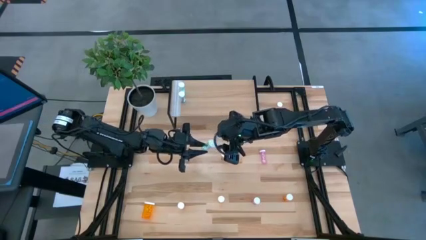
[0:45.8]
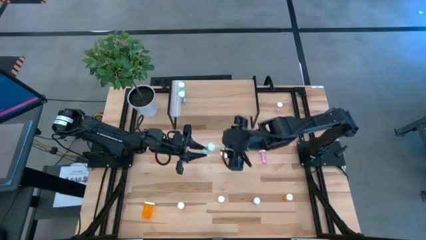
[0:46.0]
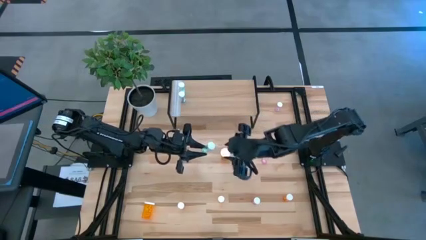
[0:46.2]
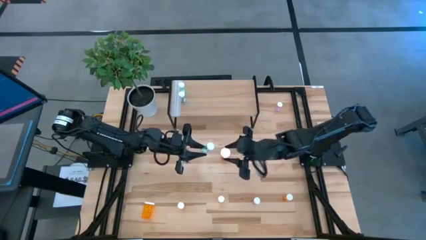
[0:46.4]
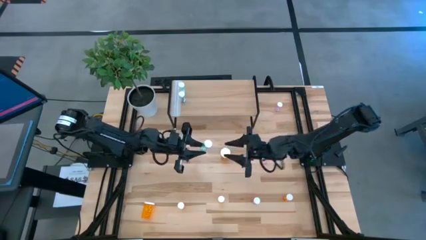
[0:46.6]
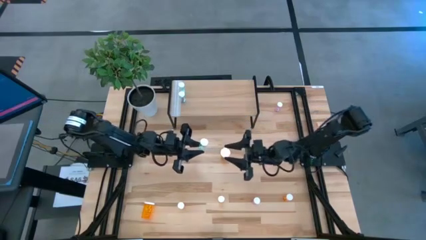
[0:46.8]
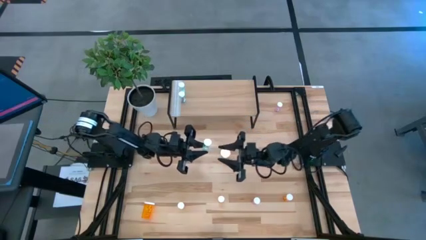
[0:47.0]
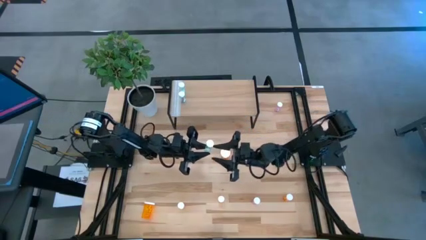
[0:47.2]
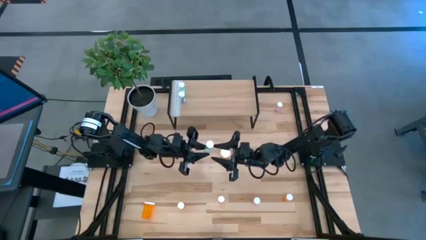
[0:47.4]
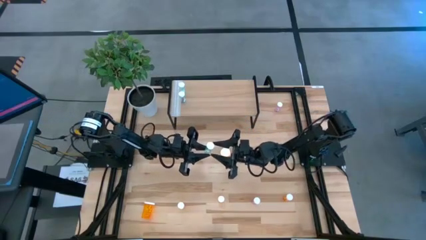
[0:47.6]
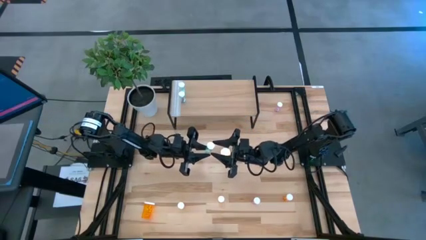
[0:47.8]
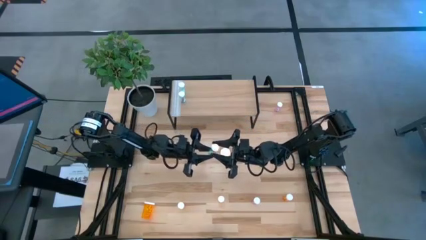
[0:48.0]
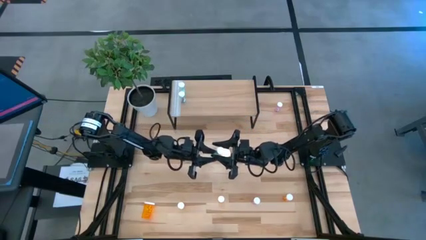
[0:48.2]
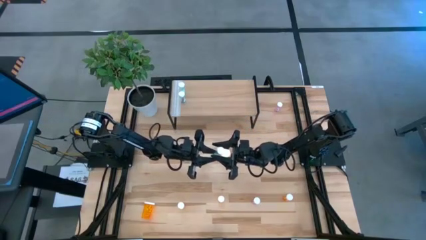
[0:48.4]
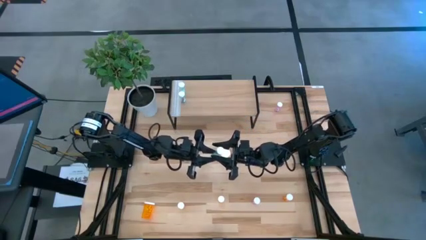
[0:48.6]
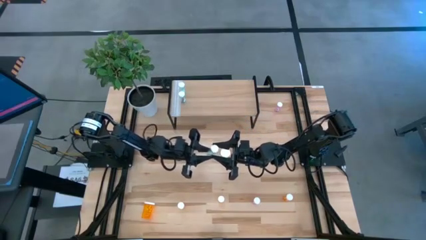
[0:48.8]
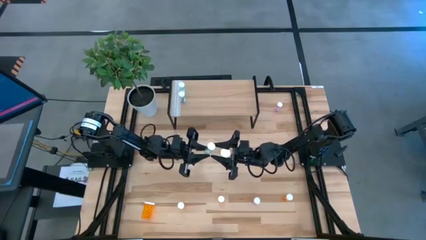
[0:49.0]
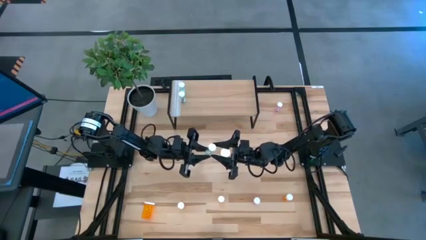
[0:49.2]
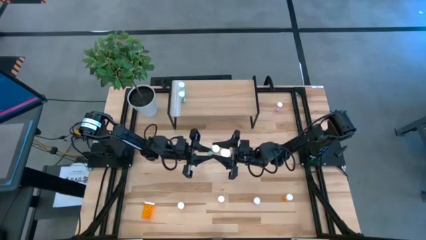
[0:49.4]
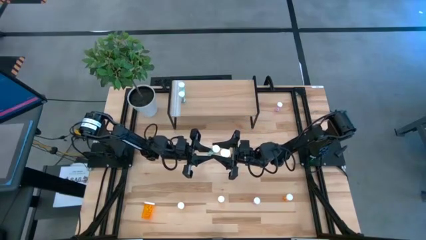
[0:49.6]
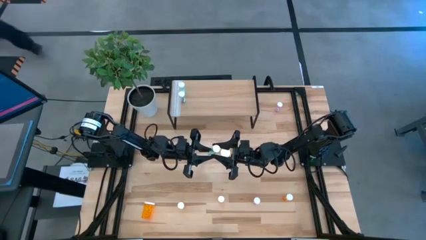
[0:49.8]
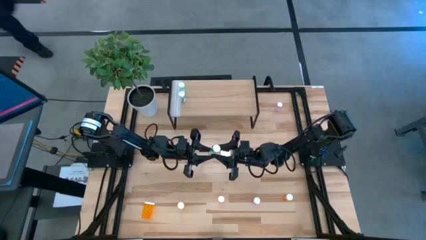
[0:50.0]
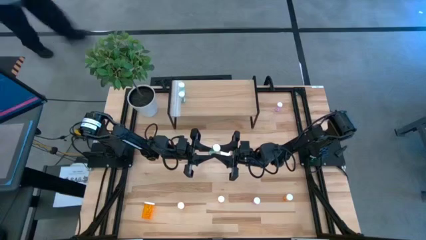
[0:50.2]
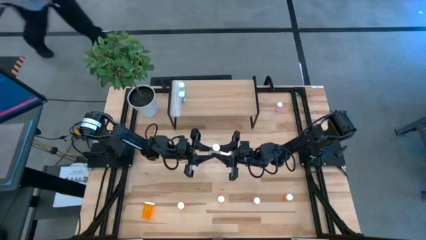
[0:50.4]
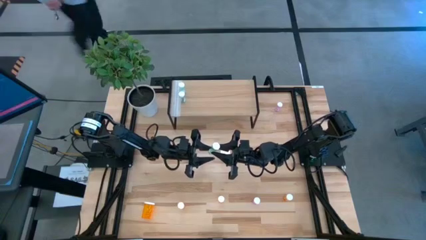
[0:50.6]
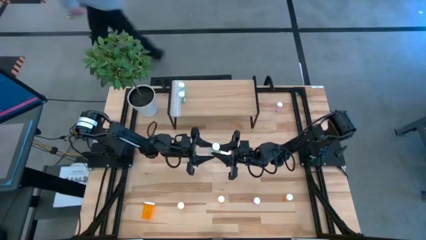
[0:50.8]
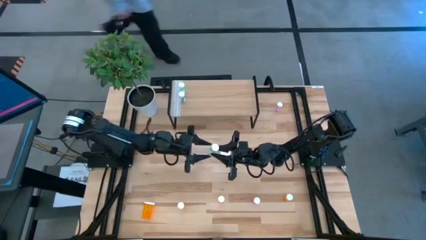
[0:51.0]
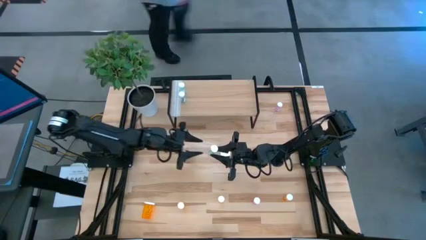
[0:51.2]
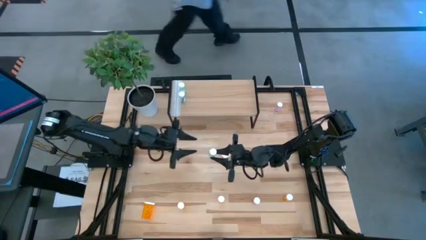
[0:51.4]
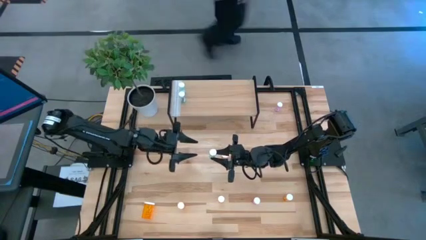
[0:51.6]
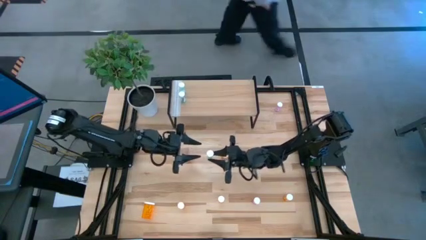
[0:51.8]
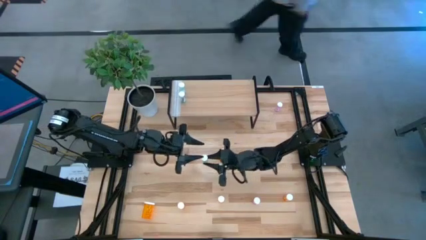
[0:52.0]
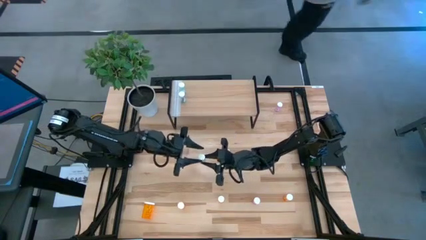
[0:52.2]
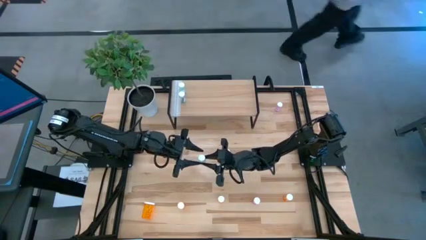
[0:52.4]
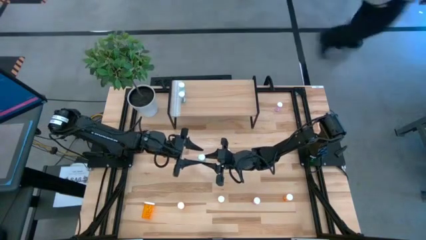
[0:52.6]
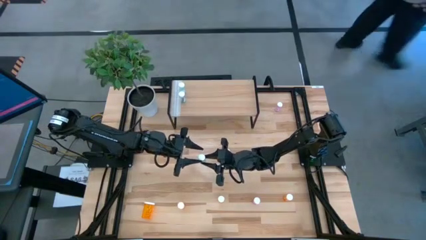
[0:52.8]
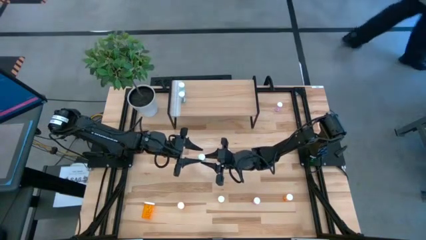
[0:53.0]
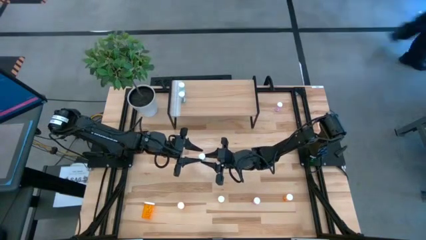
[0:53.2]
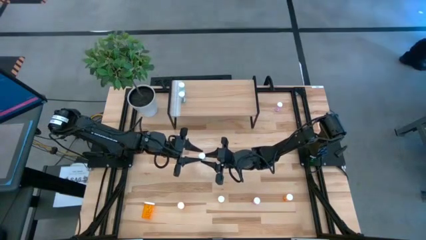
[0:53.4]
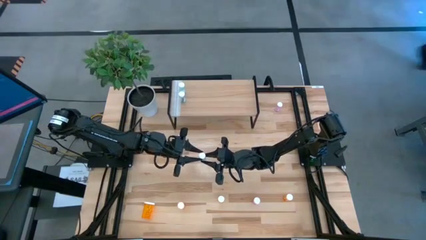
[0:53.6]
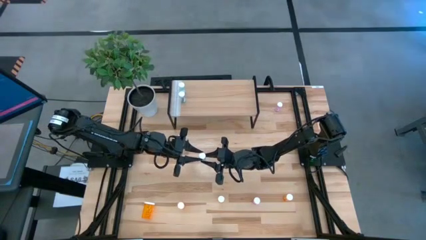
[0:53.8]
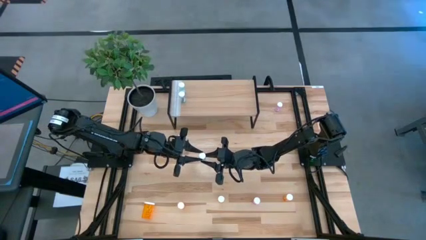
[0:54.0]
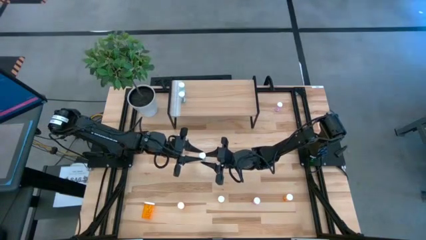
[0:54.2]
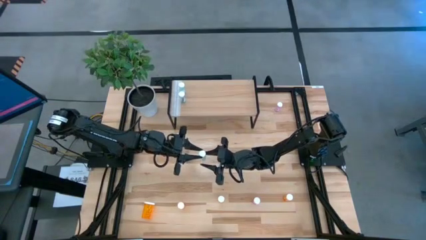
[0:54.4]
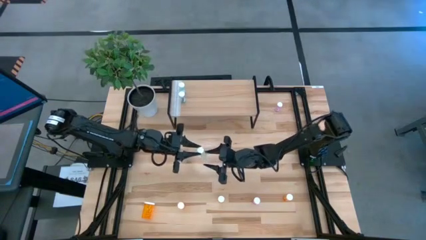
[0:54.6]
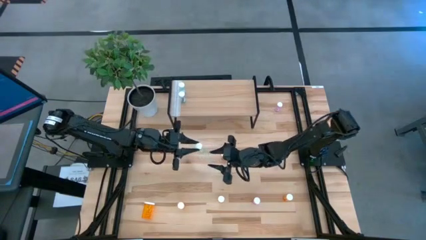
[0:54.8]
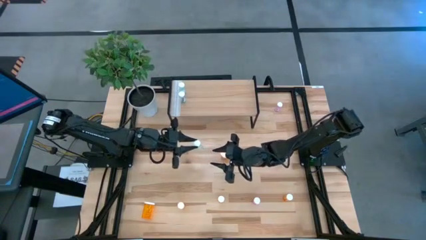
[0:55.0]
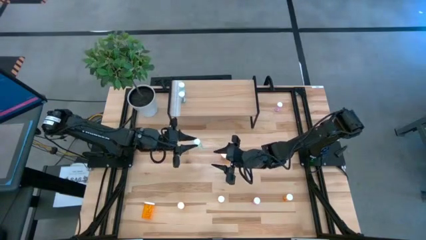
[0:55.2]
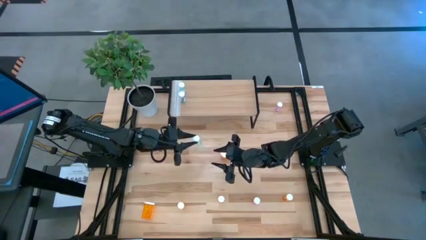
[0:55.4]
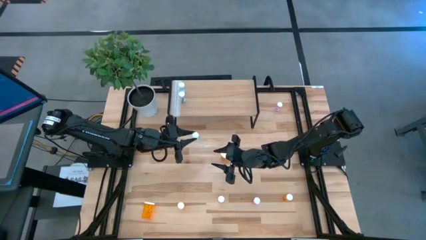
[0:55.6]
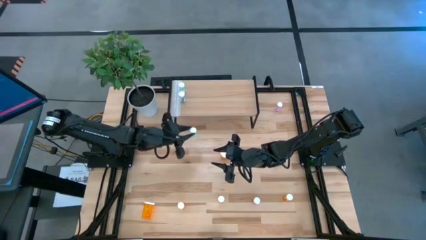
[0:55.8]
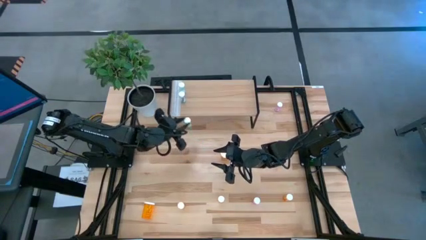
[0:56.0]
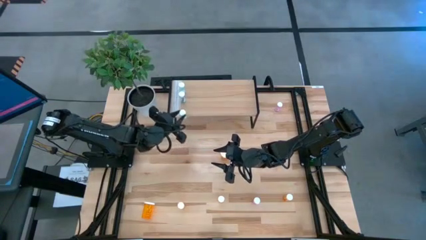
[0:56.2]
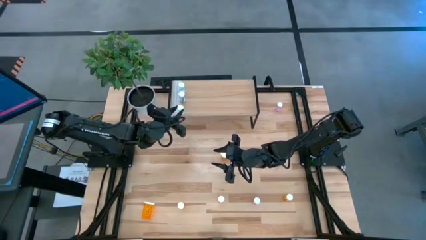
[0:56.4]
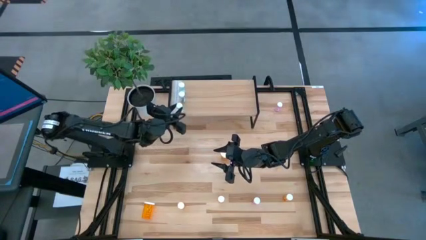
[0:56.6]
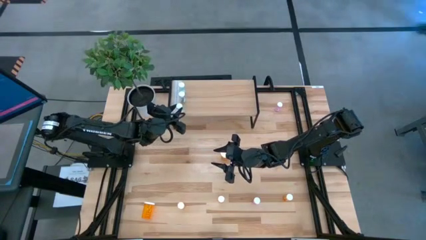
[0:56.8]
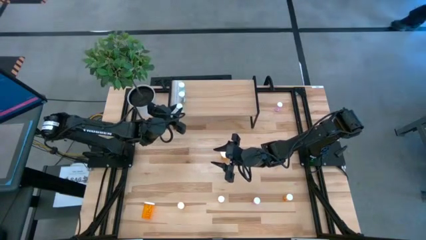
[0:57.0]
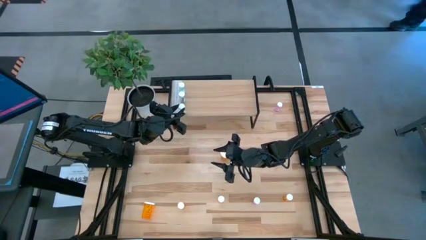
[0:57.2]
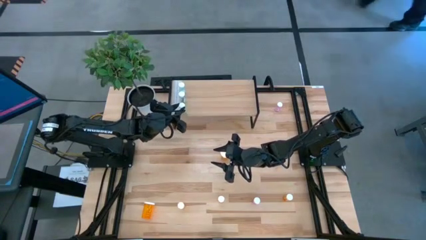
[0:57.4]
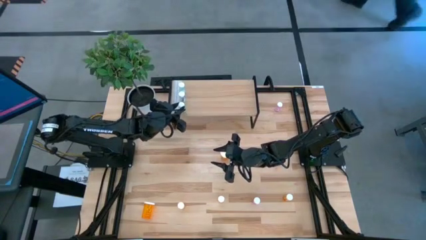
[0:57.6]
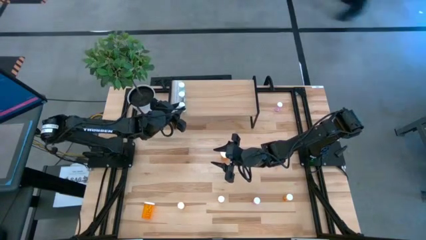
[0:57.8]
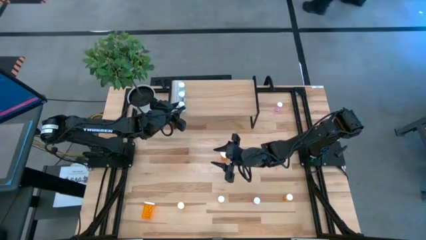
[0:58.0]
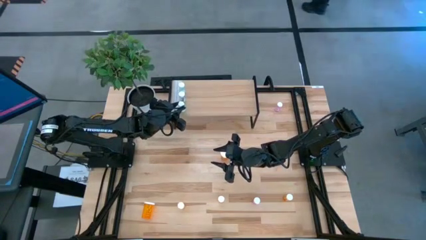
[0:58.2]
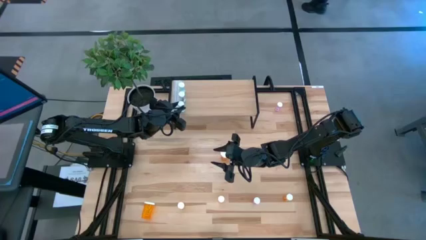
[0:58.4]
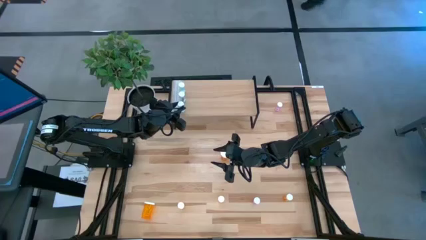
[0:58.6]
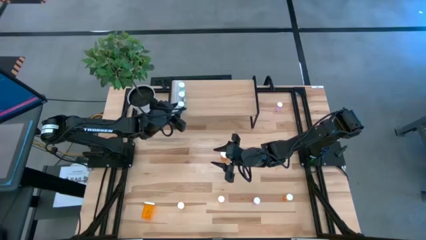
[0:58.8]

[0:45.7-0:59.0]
Task: Pick and place medicine bottles onto shelf by color
Put the blue pill bottle on the shelf aligned with the other blue pill bottles
